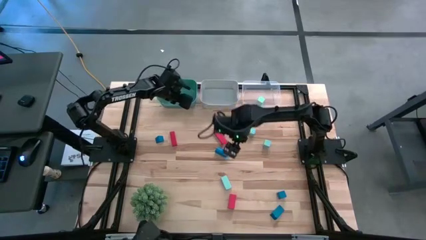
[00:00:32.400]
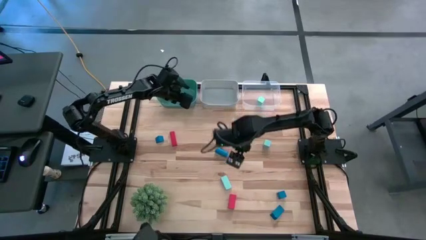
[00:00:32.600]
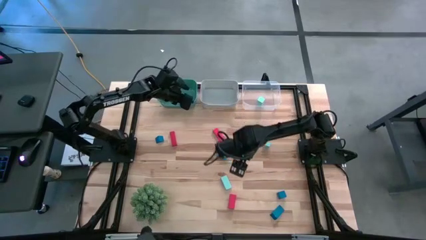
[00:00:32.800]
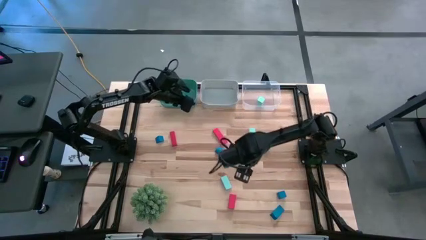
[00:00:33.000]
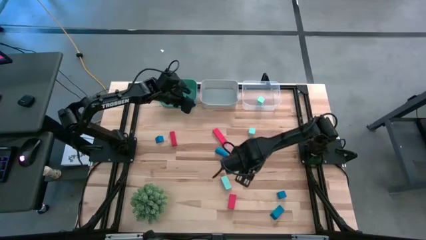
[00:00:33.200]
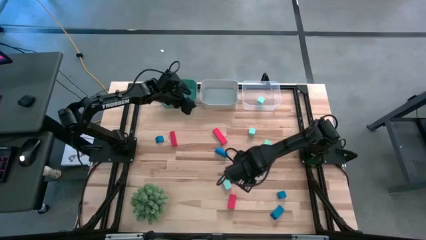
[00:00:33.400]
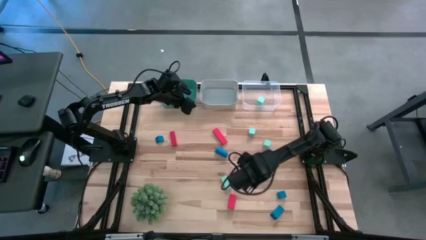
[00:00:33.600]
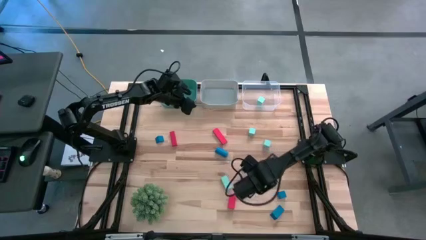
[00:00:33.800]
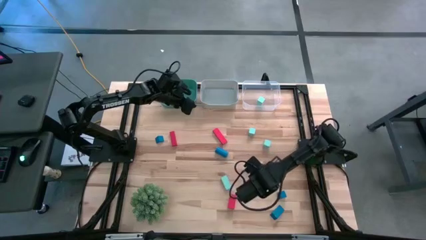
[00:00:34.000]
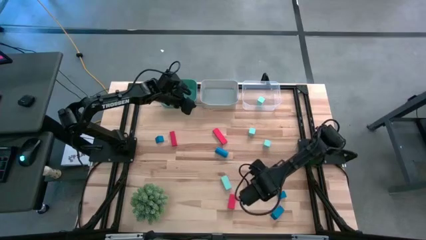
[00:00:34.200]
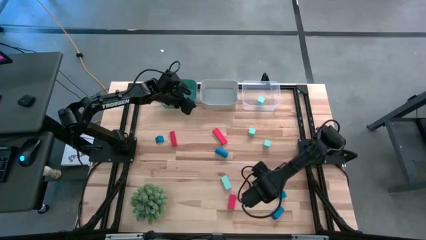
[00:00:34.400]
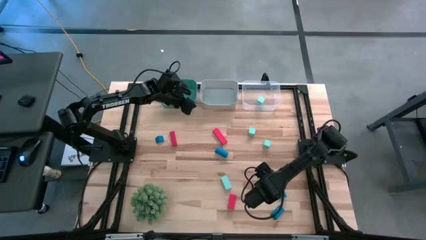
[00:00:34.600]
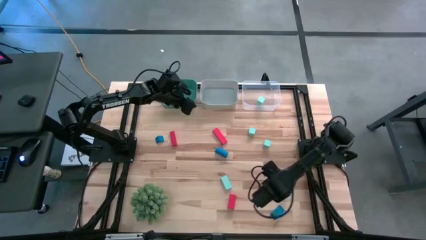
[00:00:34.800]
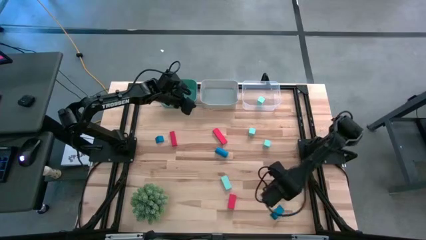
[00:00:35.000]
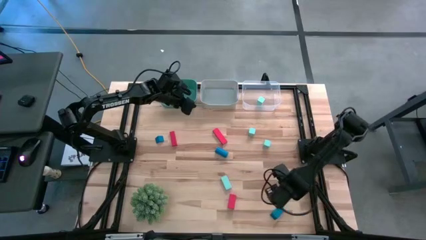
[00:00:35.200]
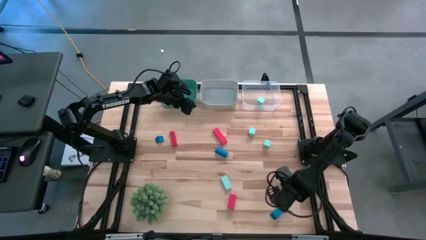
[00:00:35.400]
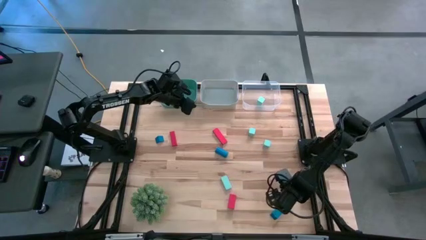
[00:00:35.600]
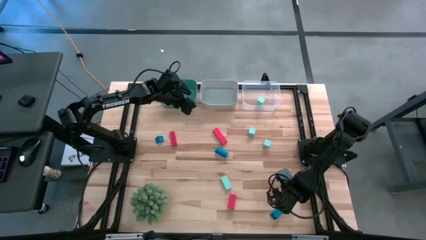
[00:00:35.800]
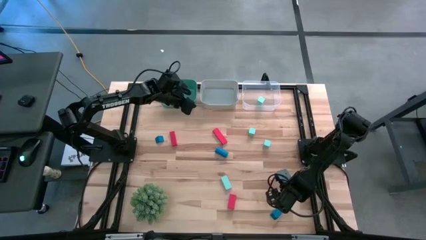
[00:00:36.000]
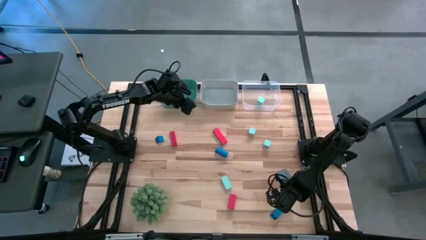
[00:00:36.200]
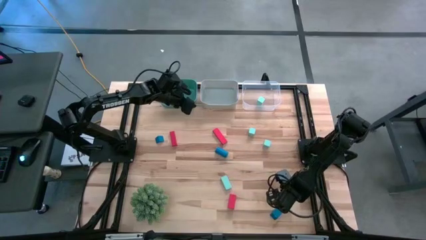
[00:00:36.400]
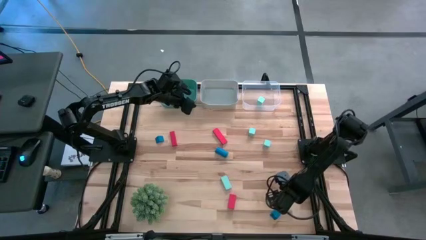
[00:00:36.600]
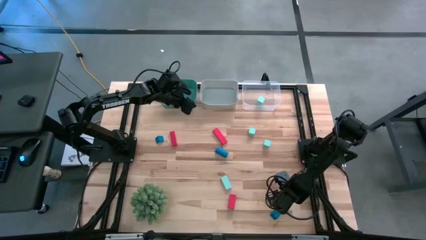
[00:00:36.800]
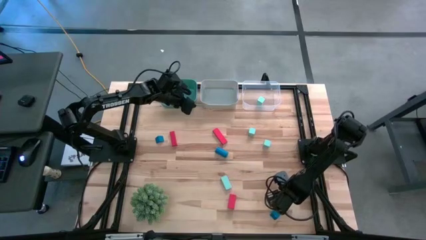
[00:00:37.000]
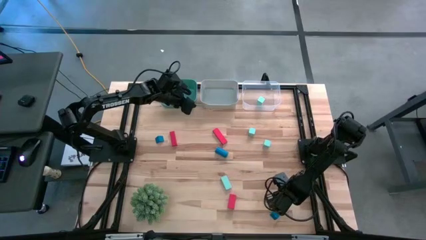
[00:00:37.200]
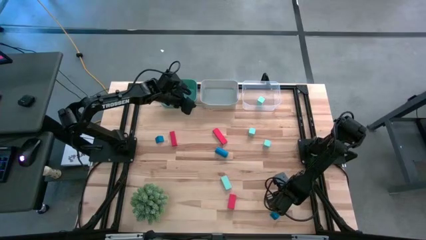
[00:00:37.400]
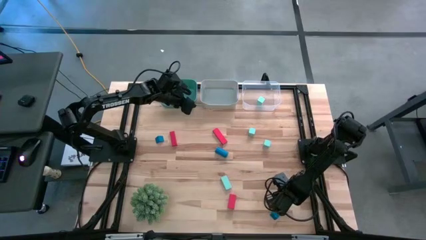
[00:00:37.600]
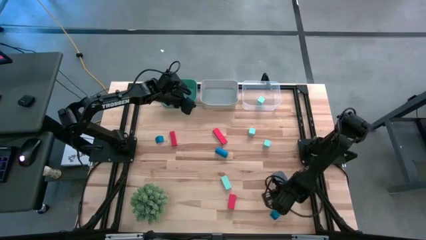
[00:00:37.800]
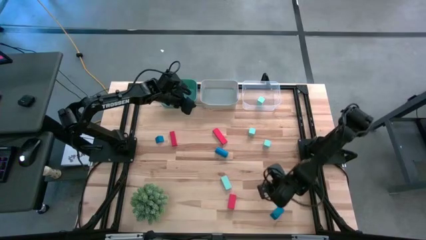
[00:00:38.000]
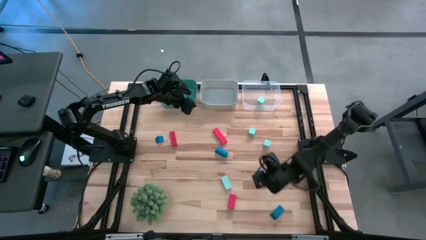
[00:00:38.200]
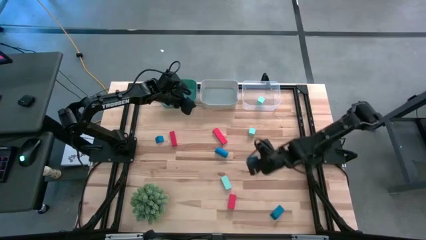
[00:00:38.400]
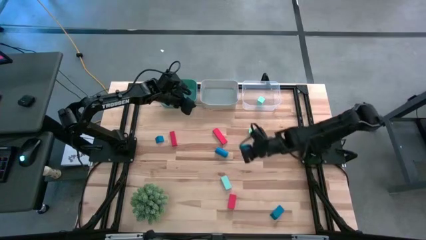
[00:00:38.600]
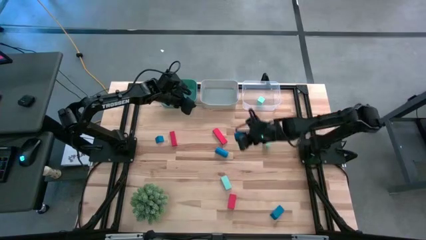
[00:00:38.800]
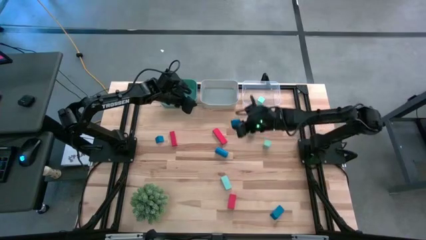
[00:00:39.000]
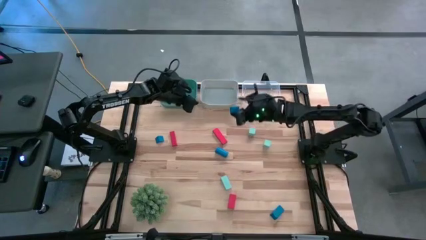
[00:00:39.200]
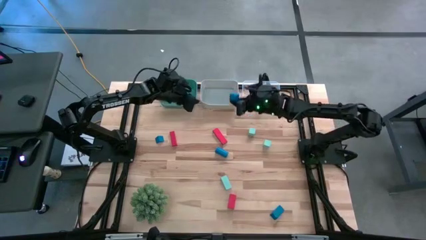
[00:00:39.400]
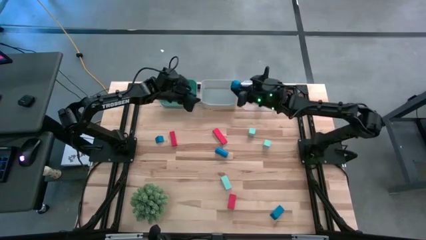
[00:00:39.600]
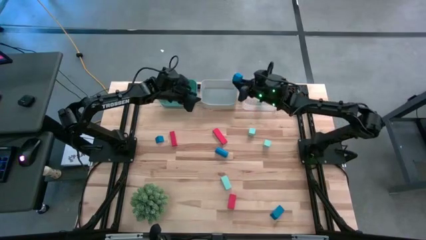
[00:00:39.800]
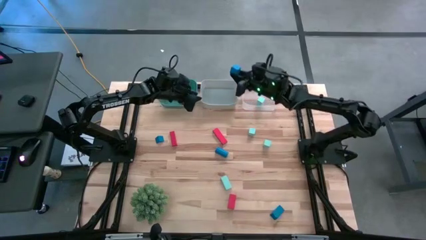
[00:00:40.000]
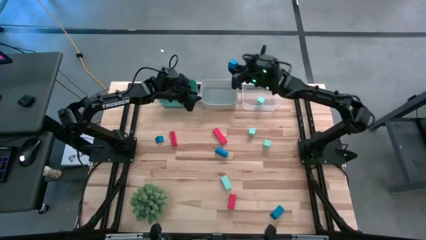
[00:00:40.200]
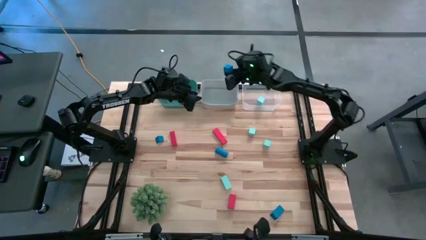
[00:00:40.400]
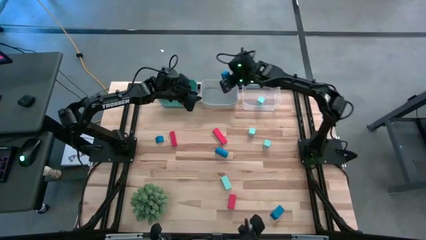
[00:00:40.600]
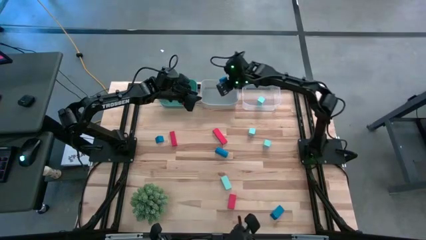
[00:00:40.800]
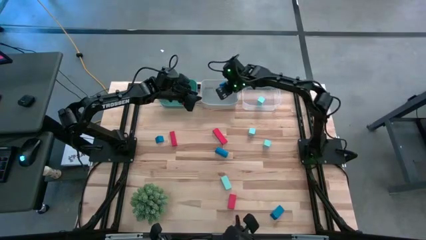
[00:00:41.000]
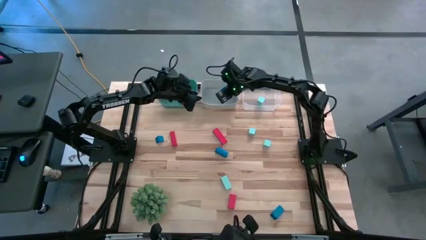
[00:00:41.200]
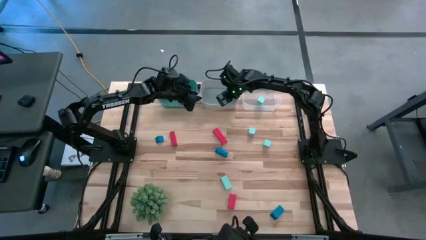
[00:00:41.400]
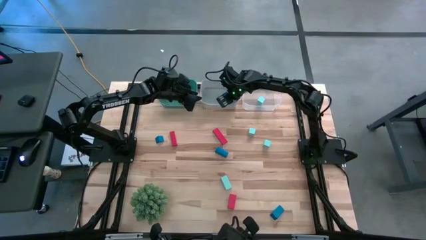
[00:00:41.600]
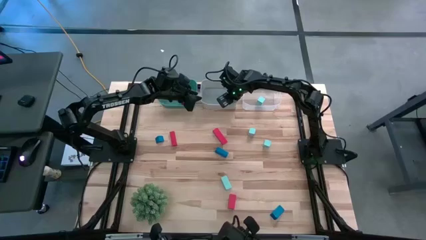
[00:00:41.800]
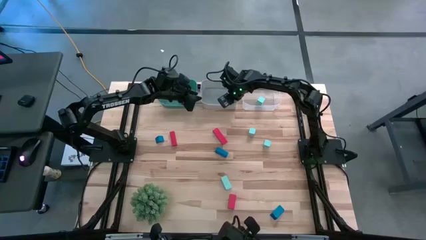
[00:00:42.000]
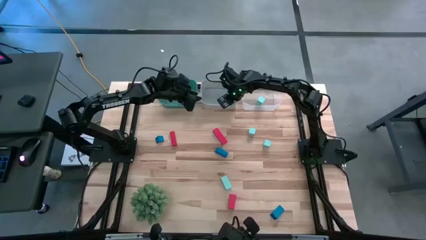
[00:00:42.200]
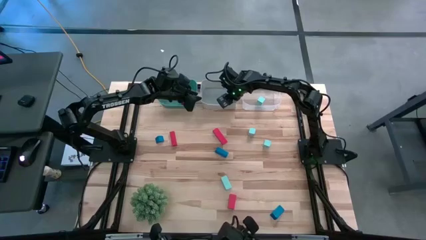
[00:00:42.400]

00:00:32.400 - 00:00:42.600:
Task: Sort & place blocks by color
Put the blue block into the gray bin

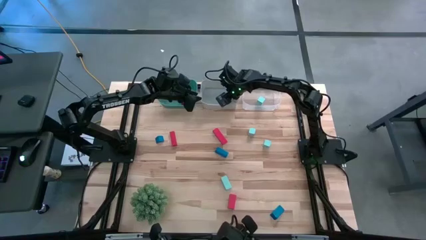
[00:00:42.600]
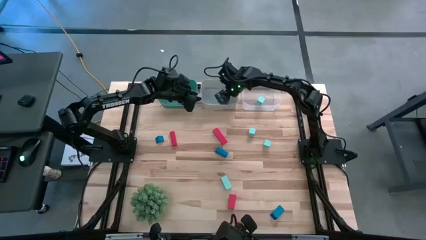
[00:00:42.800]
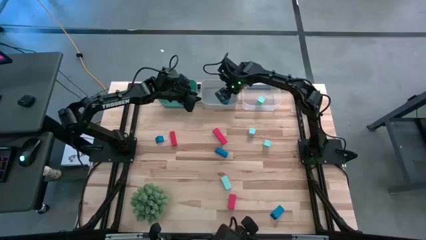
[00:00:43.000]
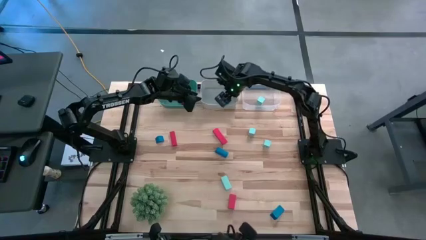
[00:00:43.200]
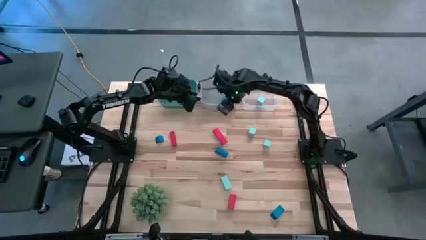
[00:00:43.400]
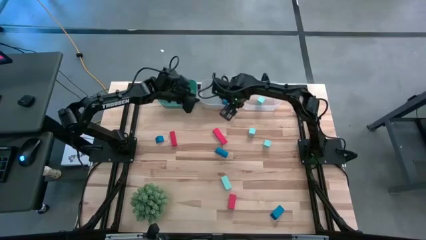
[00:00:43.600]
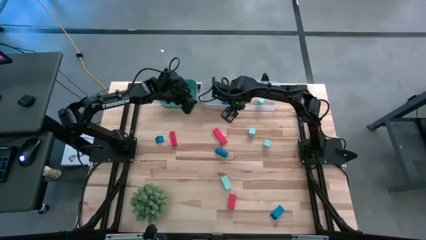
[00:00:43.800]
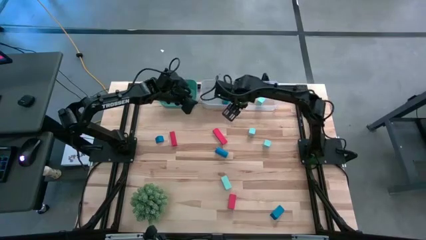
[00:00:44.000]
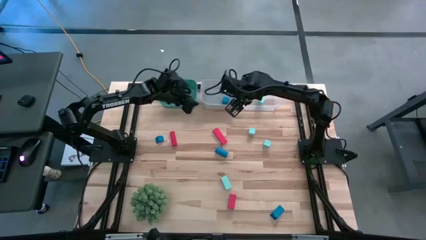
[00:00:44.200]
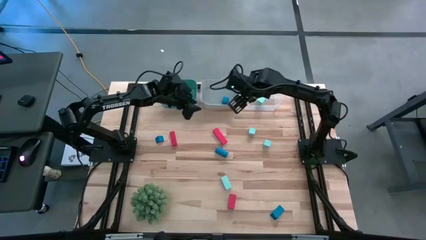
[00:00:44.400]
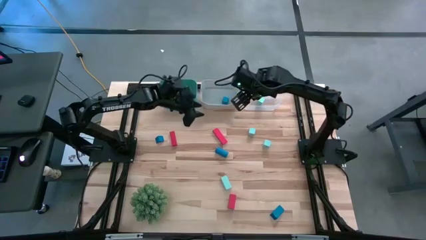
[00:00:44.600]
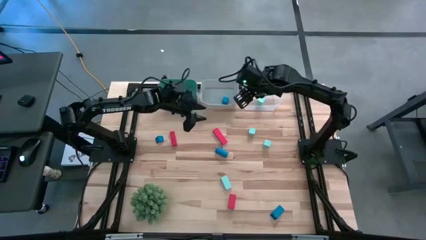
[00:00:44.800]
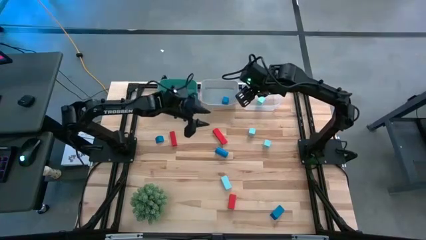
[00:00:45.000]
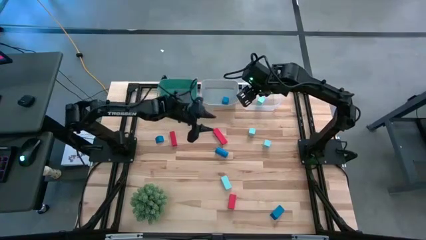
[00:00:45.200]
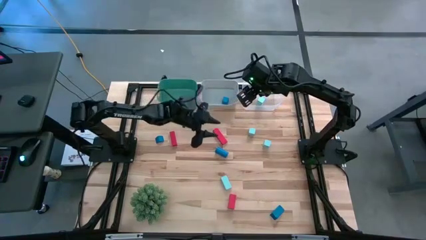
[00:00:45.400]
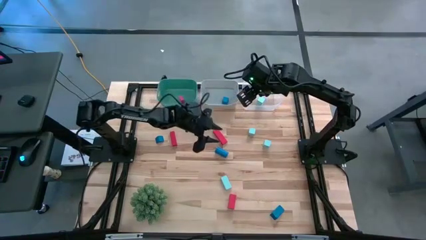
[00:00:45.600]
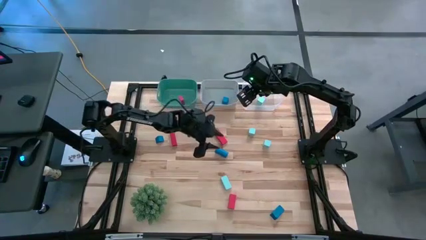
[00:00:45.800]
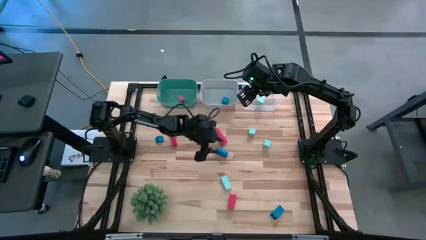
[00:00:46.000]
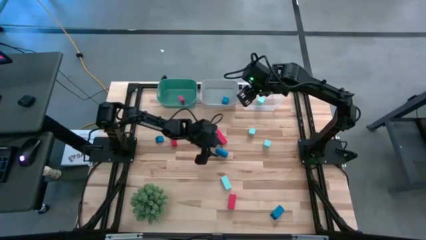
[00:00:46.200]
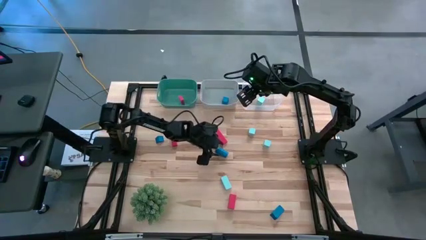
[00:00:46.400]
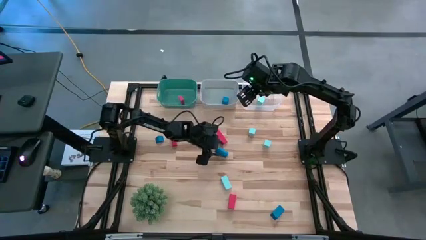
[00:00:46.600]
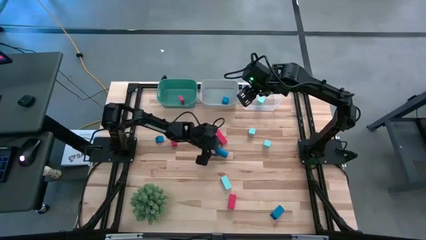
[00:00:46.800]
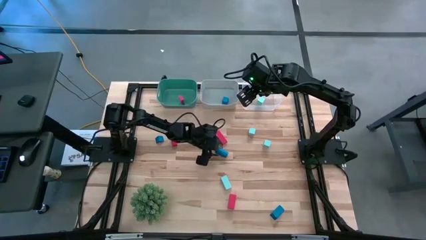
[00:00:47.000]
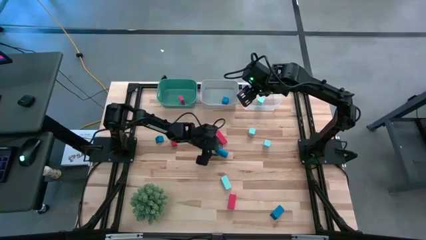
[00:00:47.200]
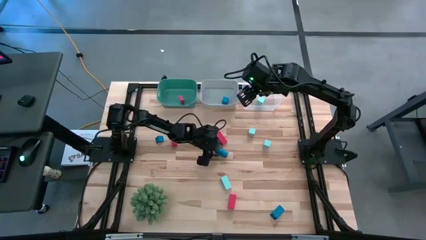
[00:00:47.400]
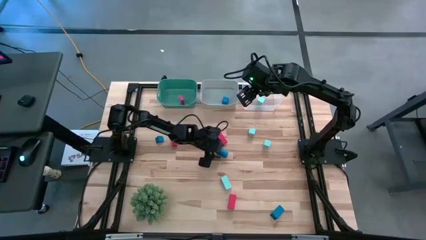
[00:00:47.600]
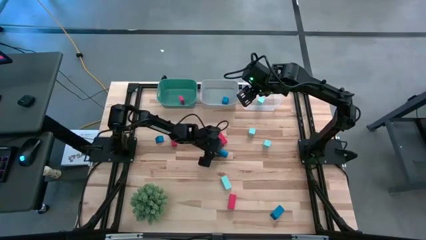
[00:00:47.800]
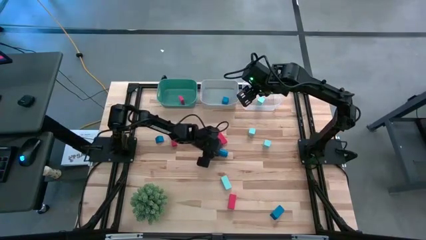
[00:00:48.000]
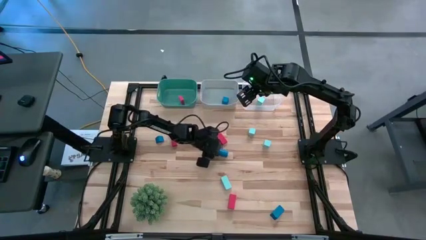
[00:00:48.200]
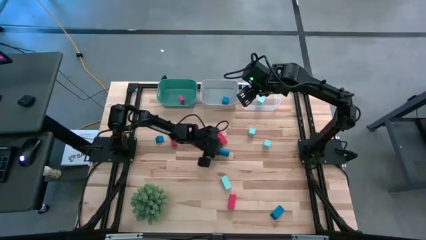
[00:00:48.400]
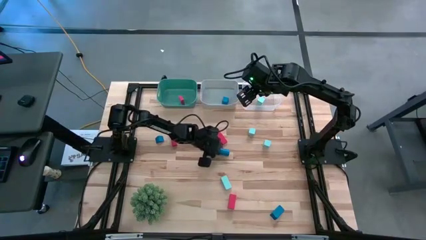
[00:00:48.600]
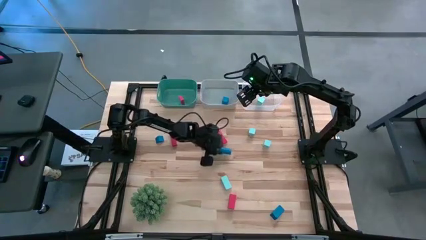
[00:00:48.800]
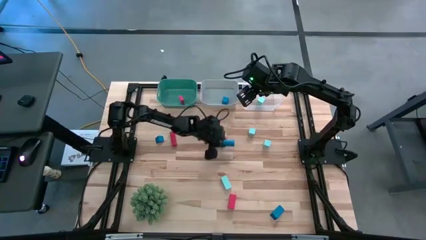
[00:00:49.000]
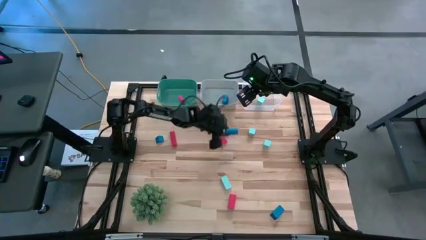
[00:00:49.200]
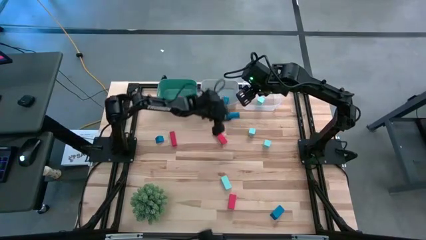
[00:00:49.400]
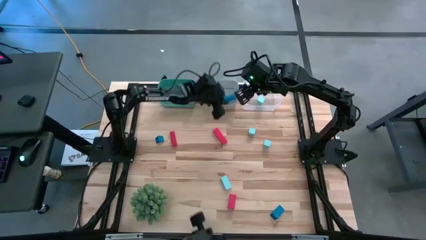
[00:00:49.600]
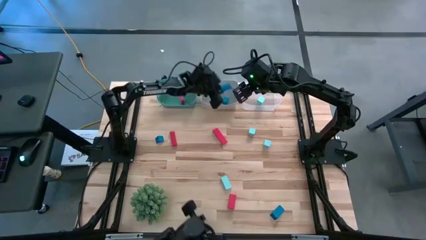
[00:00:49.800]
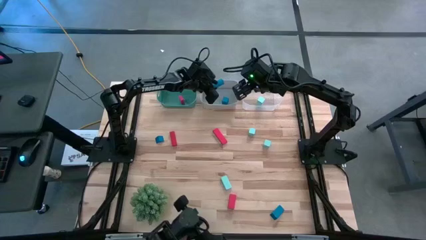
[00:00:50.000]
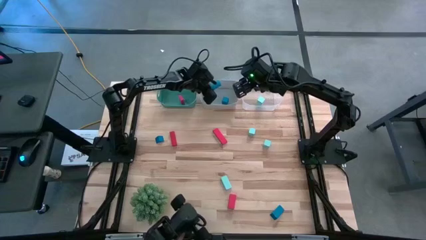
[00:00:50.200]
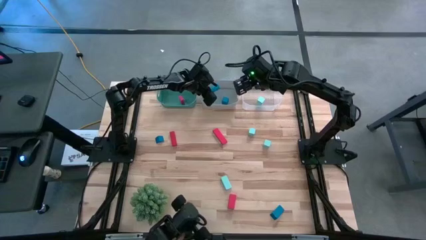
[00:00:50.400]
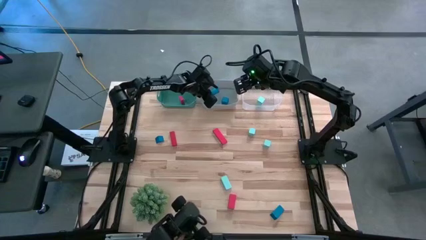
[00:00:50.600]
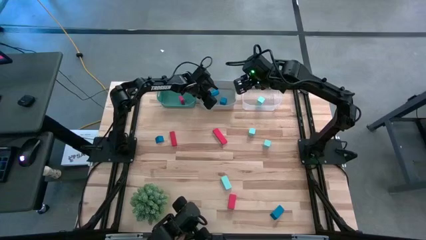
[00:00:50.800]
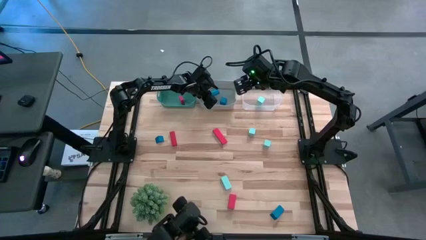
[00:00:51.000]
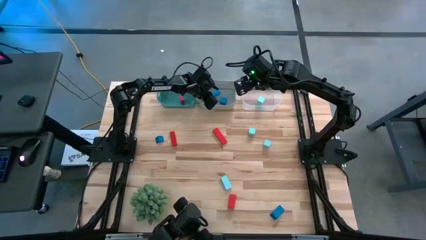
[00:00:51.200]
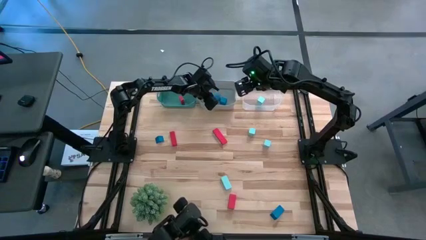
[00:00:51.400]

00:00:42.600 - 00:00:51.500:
Put the blue block into the gray bin
